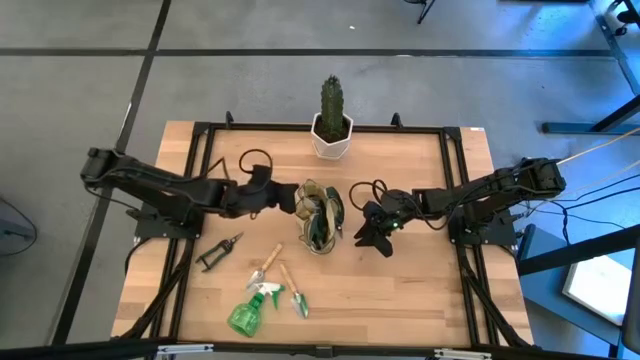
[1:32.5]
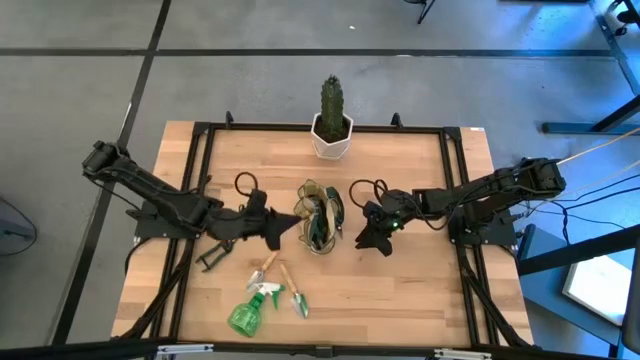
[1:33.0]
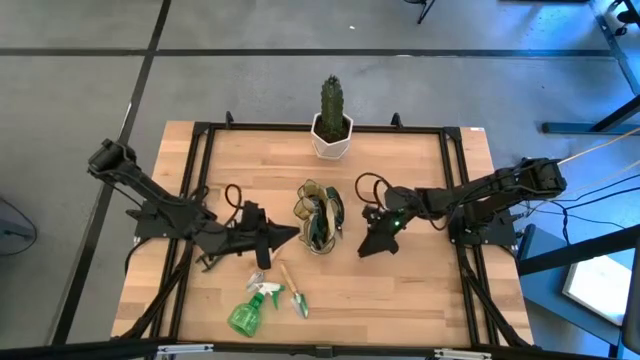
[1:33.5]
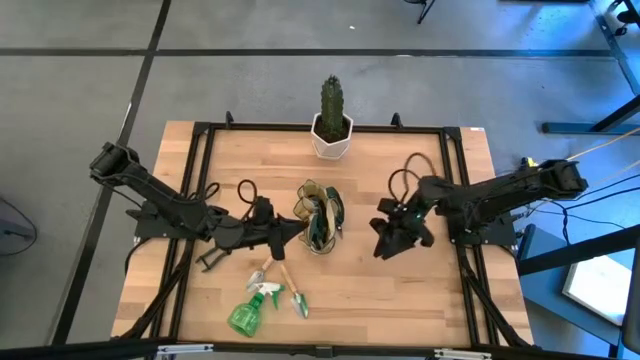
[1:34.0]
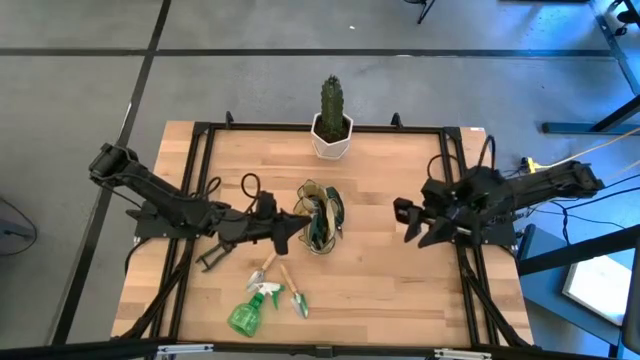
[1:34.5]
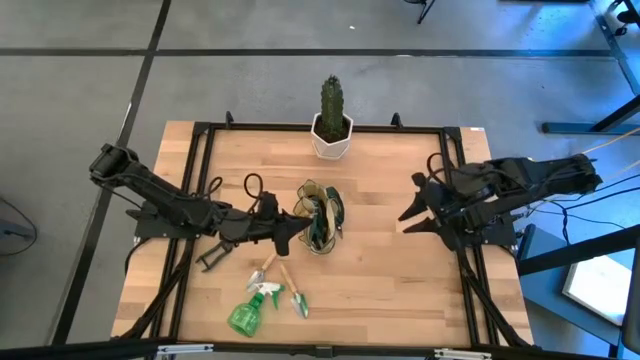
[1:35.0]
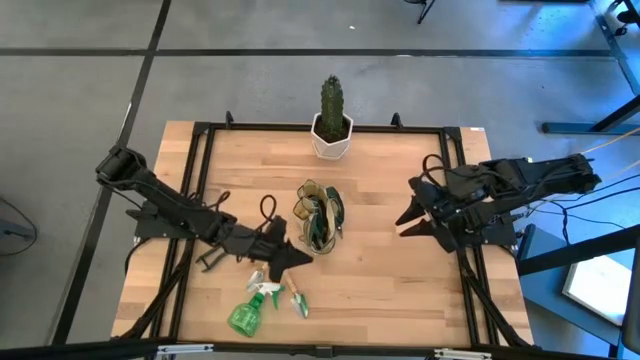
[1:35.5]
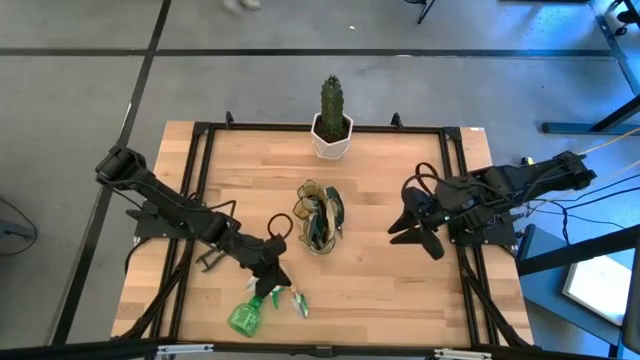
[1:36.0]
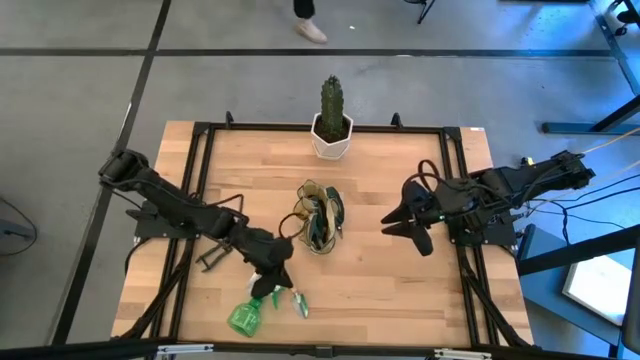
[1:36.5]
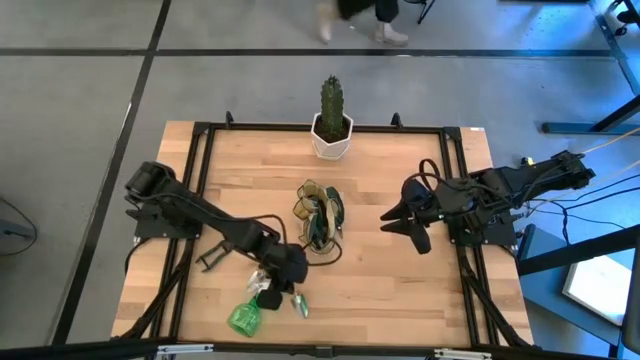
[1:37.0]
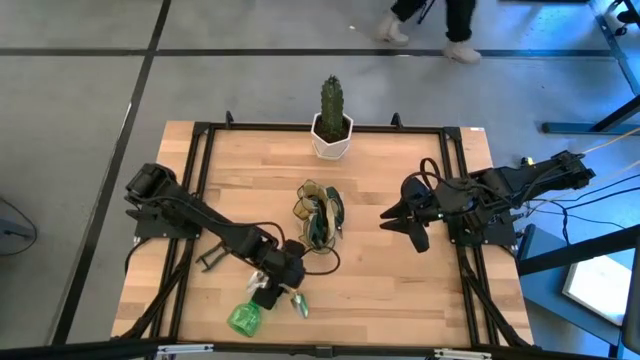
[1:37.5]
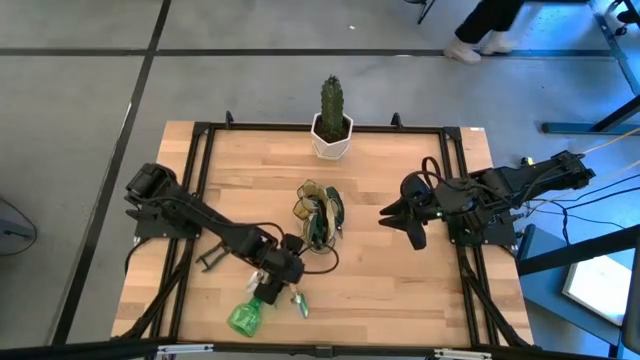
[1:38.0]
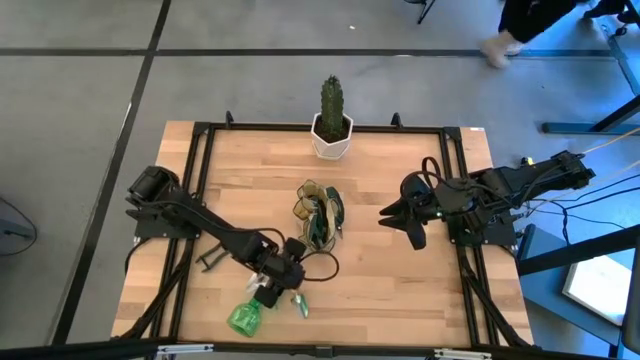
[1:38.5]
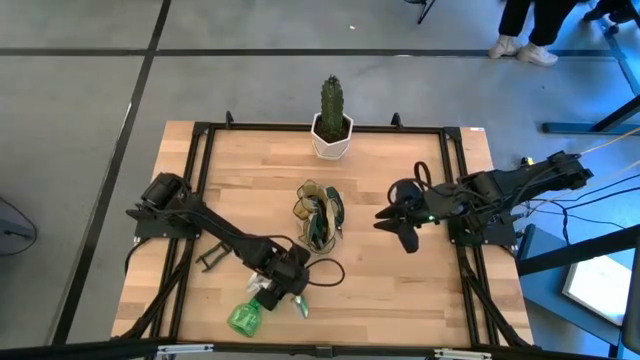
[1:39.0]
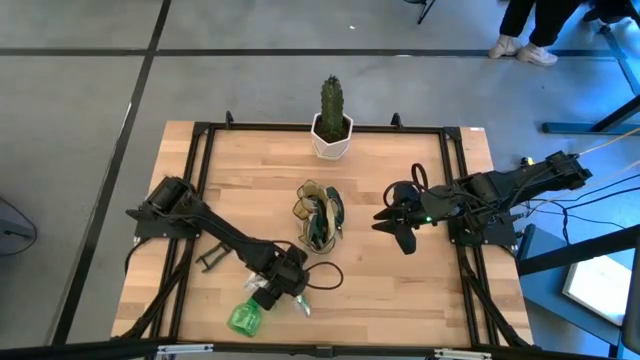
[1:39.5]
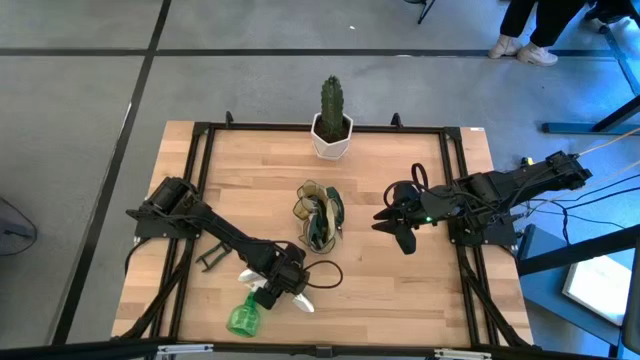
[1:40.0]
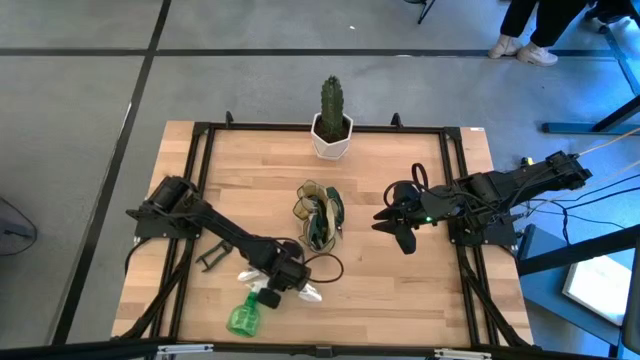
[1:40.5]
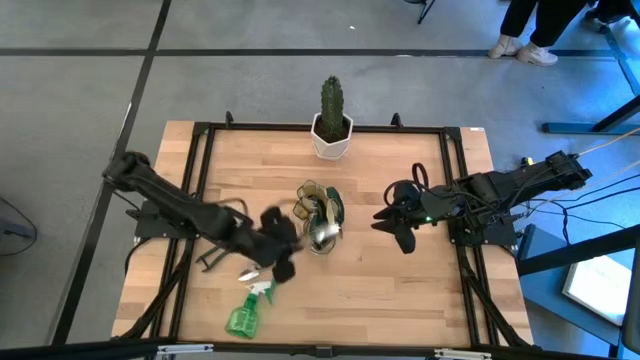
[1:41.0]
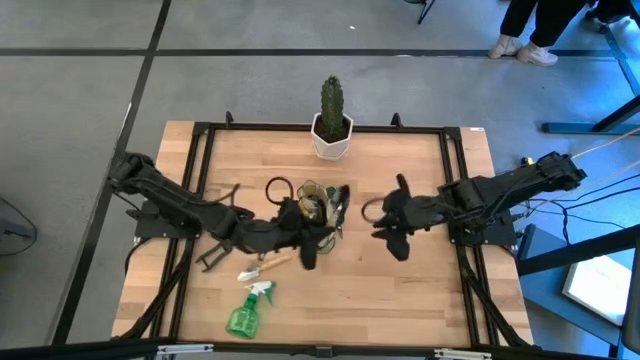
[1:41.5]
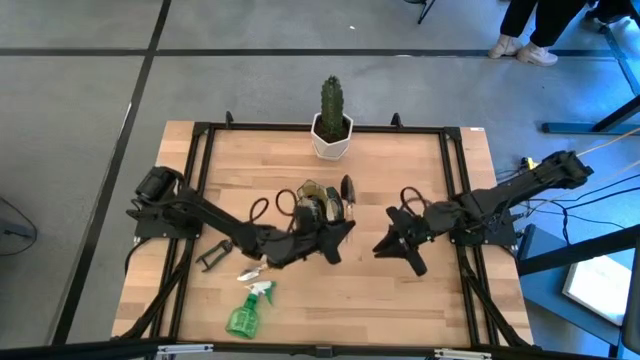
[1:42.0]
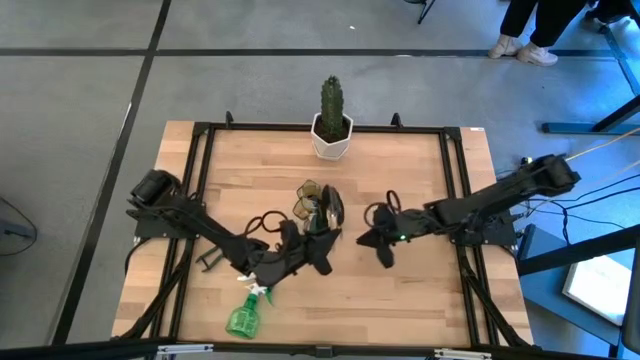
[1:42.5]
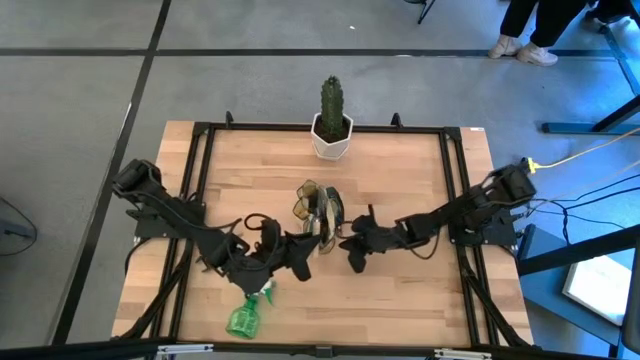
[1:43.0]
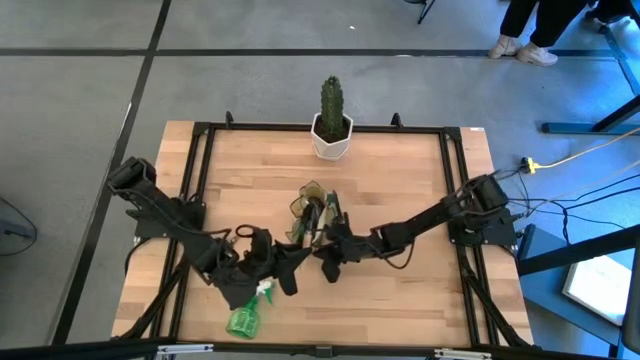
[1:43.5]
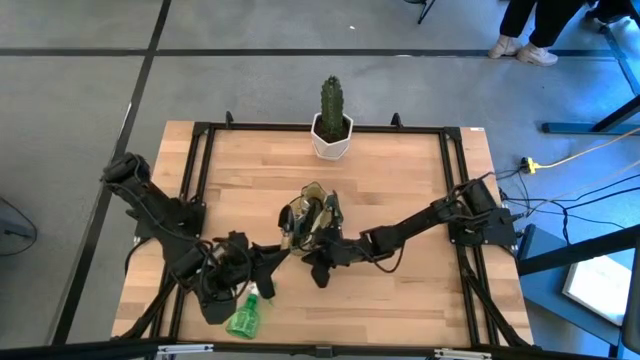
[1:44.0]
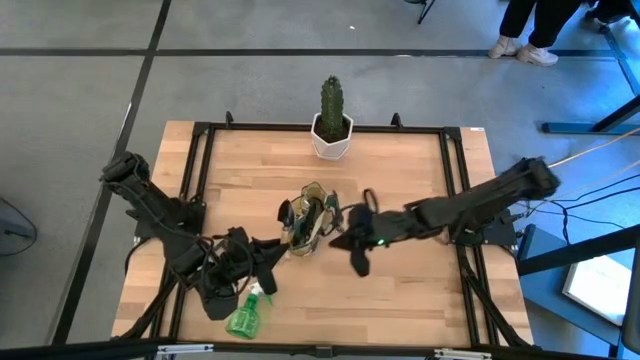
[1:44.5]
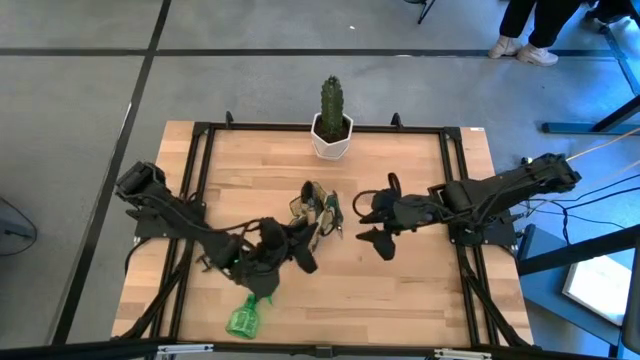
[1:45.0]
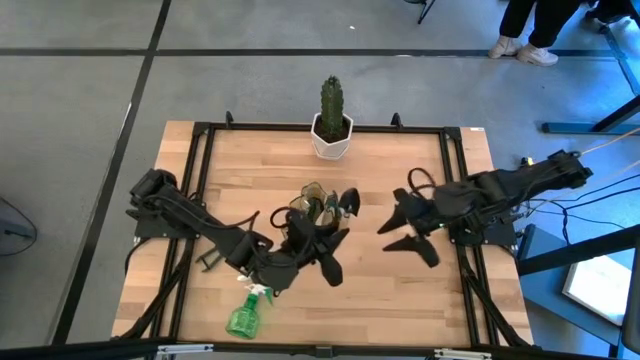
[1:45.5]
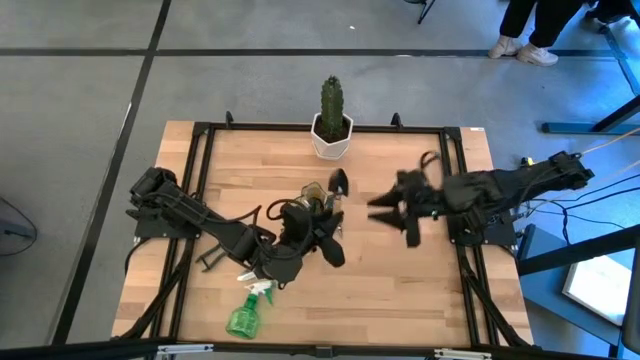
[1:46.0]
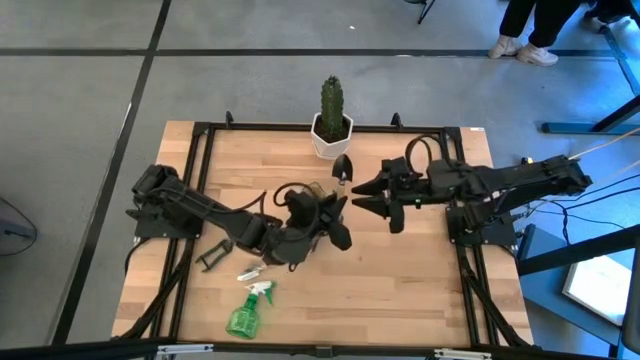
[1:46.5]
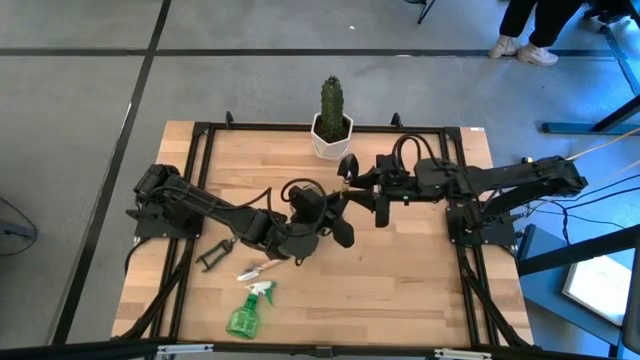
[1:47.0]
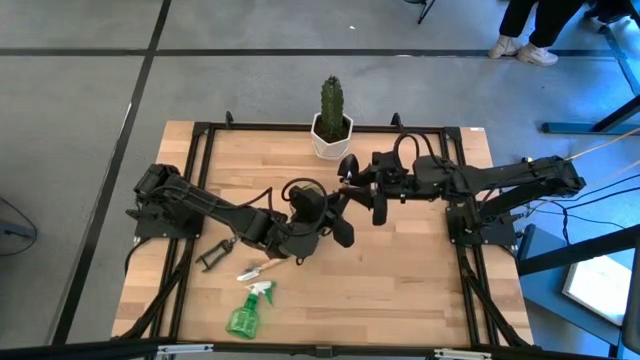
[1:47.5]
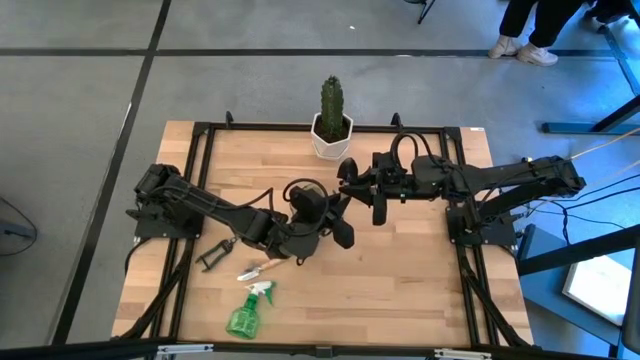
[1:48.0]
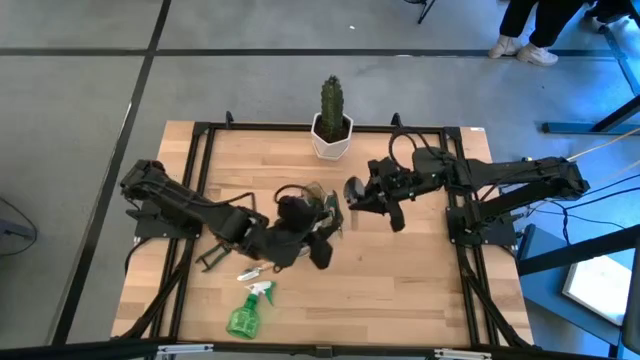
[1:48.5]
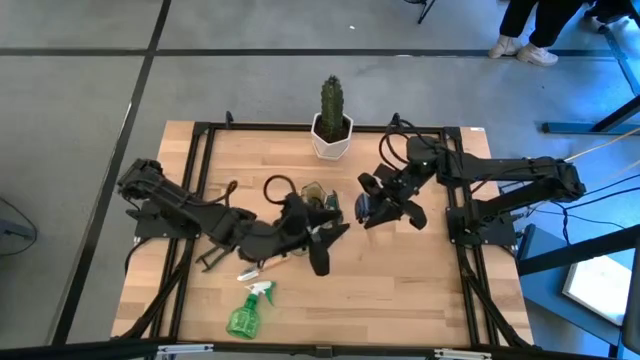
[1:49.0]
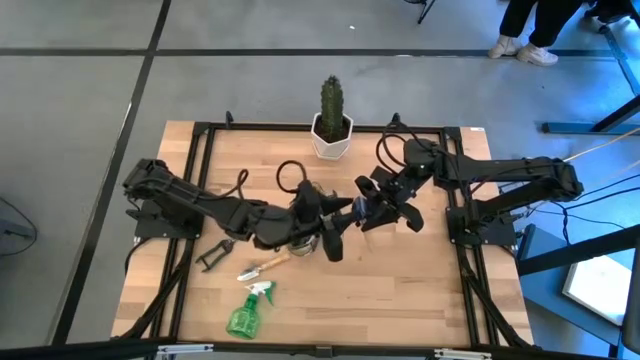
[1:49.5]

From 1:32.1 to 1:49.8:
Task: Pick & Place Garden tools in Gardening bag
Put the right brown trowel into the green gardening bag

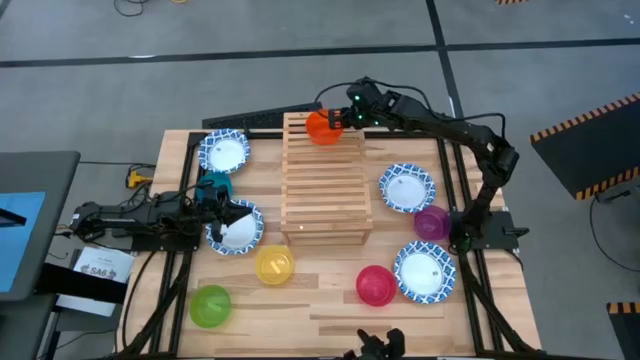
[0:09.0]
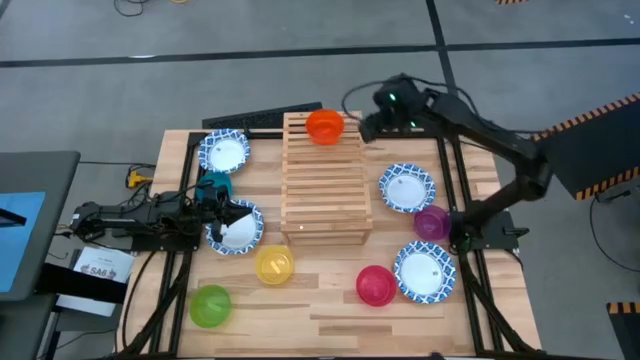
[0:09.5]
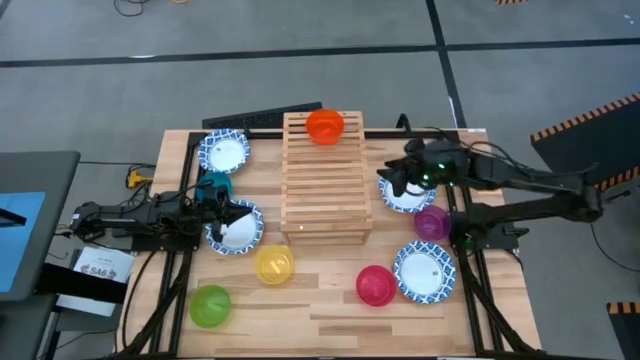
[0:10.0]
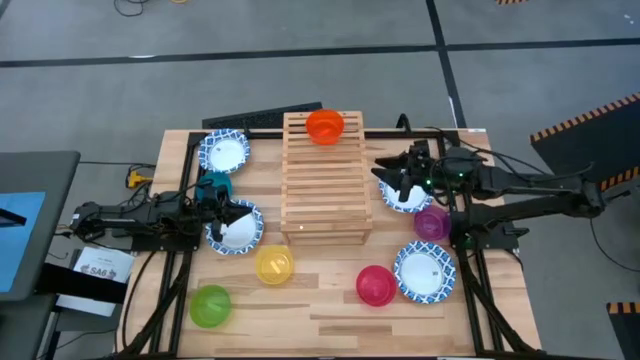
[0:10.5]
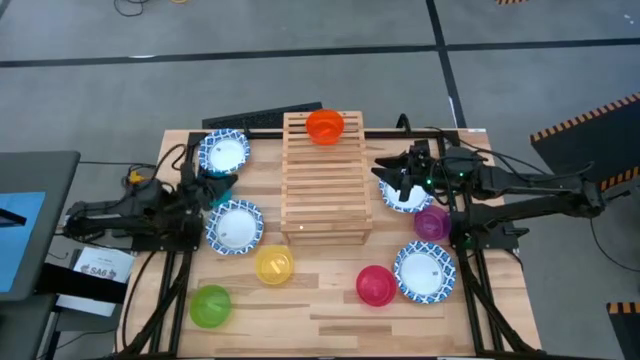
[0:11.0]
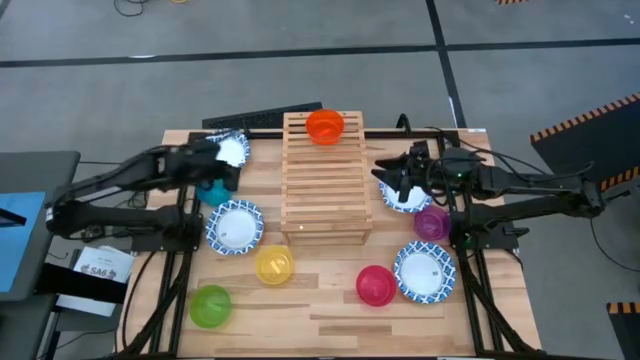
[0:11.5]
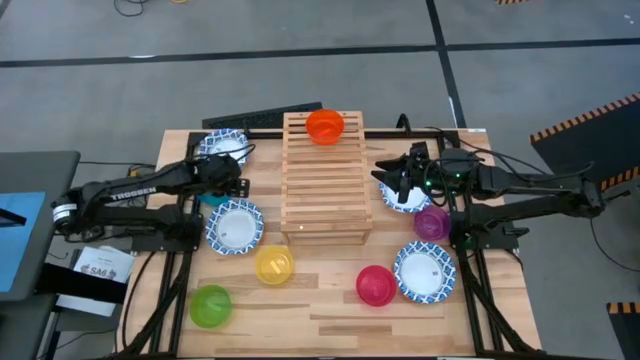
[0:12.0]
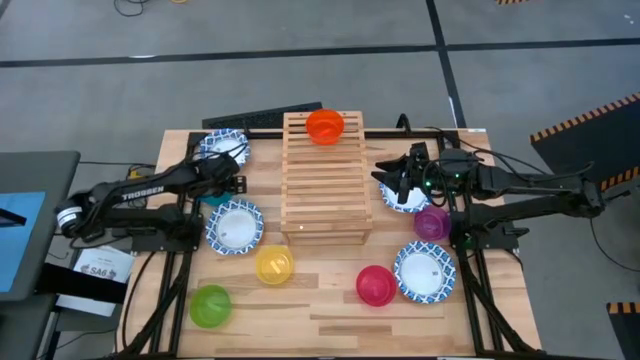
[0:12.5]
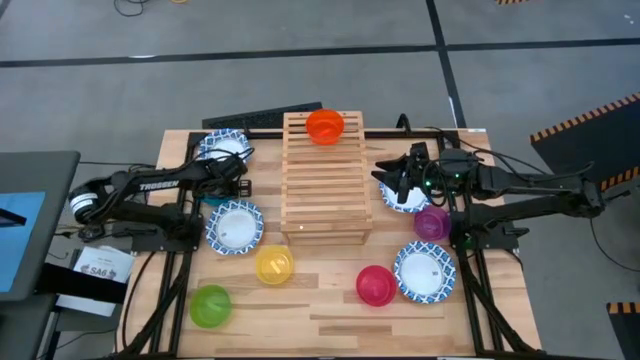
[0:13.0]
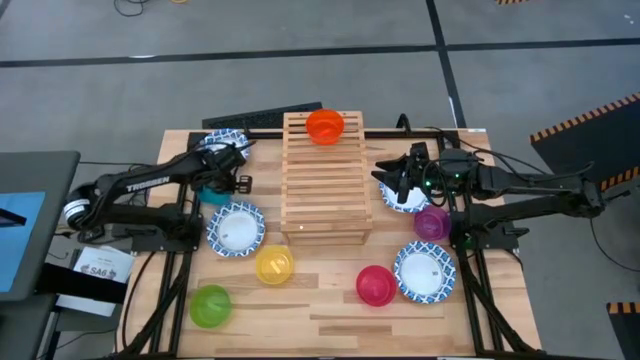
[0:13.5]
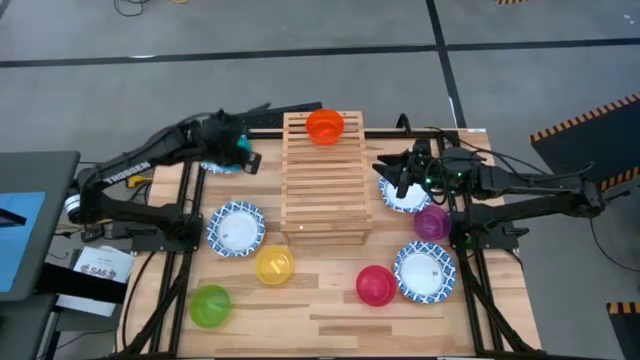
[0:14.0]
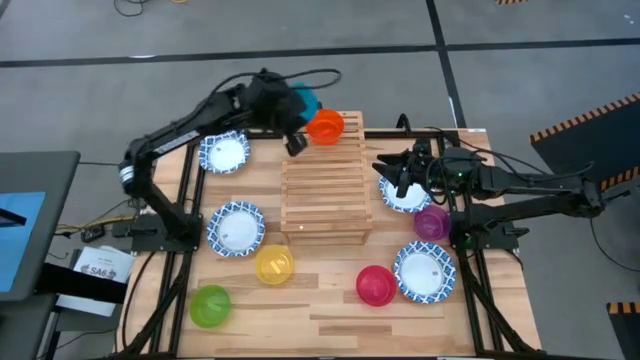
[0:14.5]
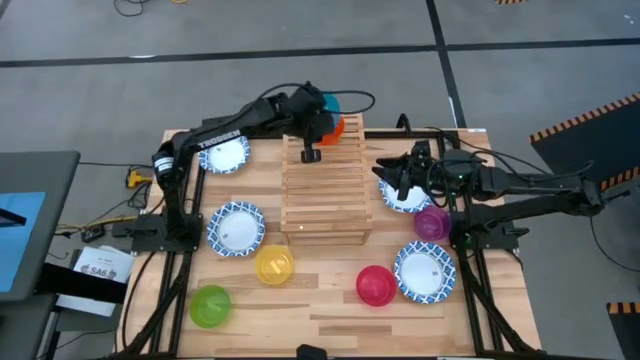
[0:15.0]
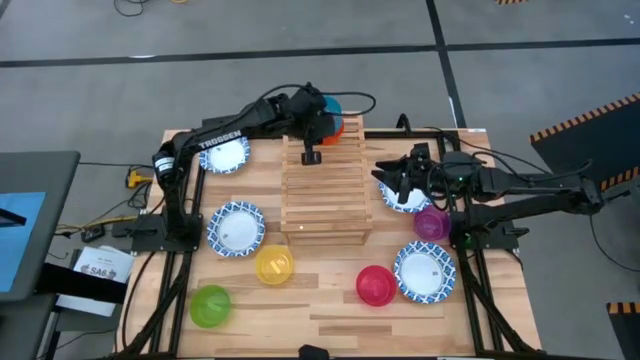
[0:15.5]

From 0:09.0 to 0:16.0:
Task: Place and stack bowls onto a shelf
Stack the blue bowl on top of the other orange bowl on the shelf
